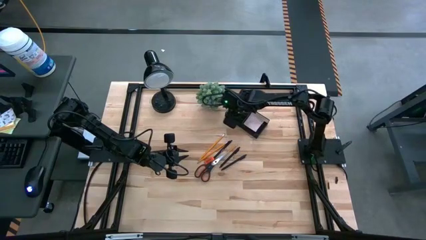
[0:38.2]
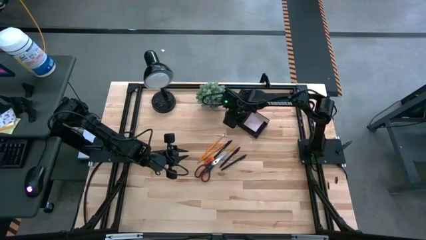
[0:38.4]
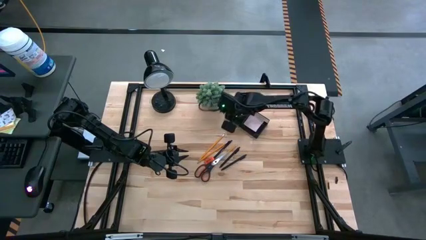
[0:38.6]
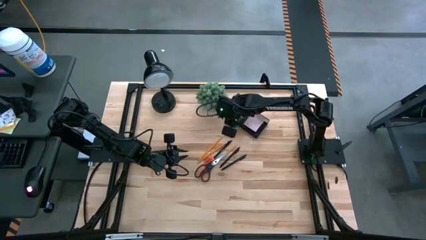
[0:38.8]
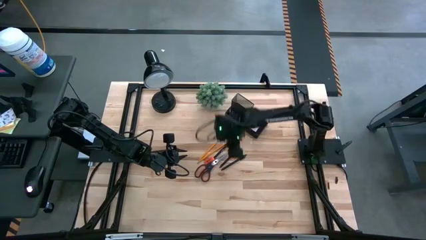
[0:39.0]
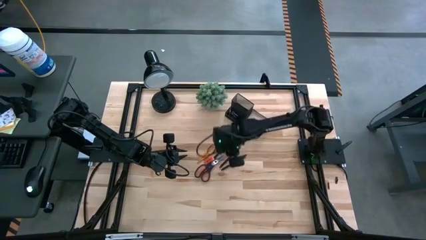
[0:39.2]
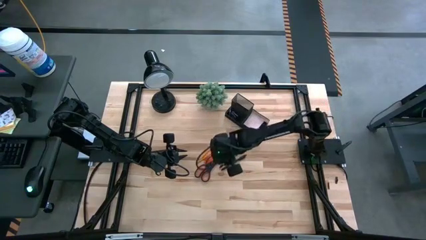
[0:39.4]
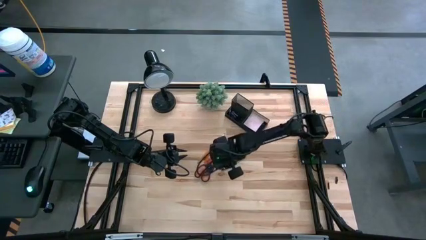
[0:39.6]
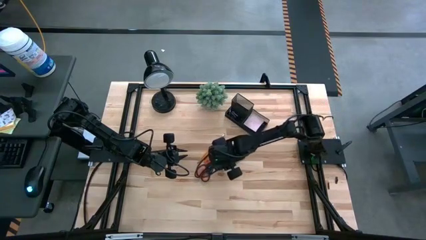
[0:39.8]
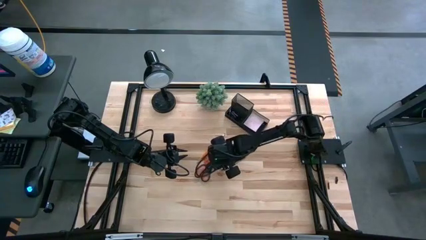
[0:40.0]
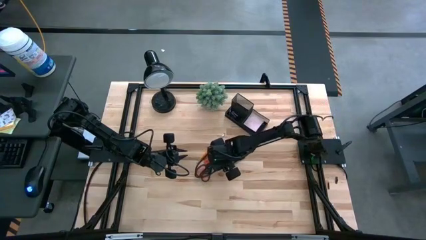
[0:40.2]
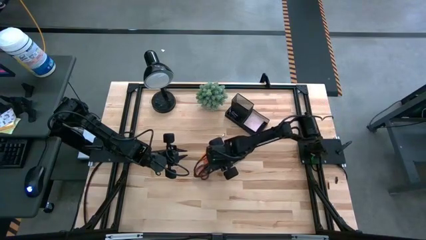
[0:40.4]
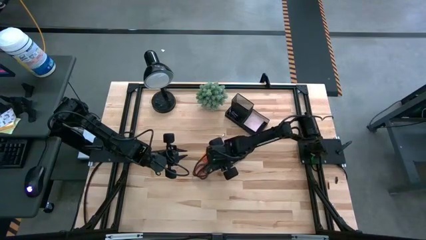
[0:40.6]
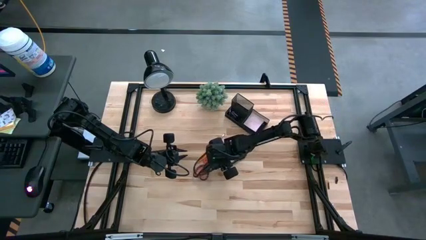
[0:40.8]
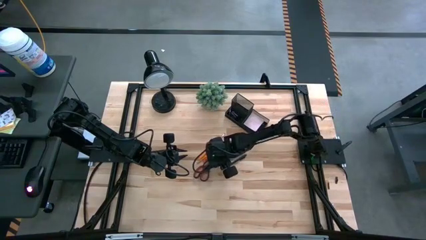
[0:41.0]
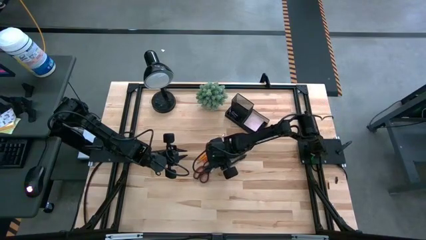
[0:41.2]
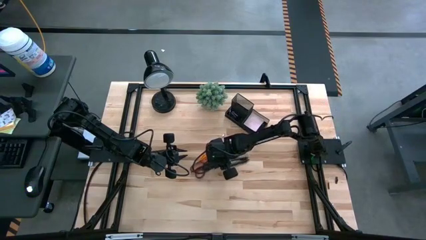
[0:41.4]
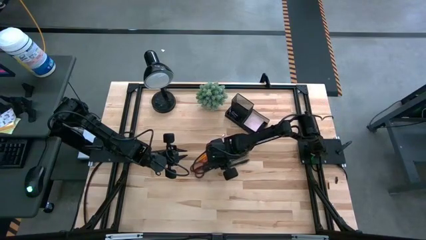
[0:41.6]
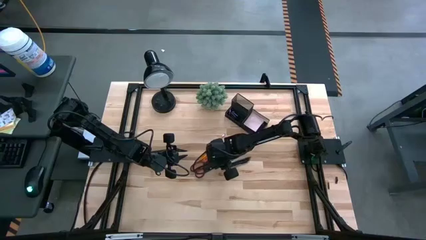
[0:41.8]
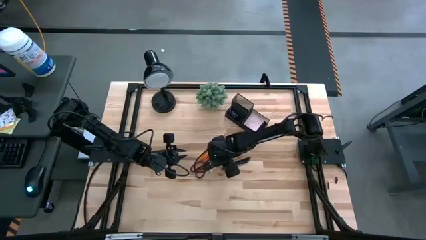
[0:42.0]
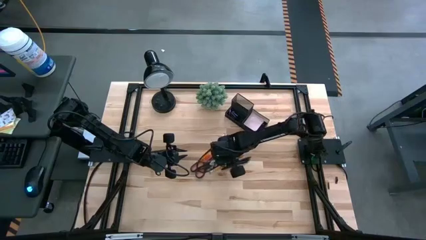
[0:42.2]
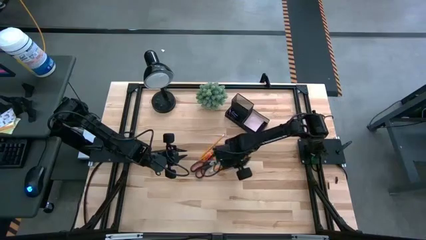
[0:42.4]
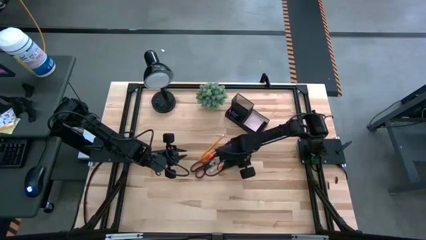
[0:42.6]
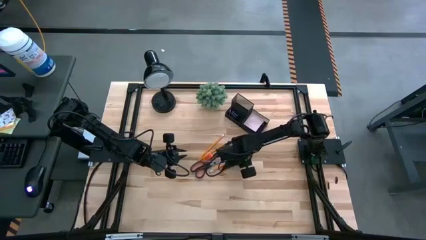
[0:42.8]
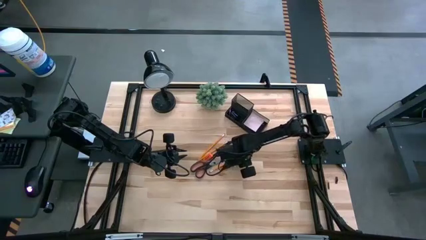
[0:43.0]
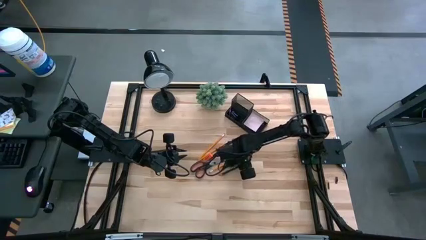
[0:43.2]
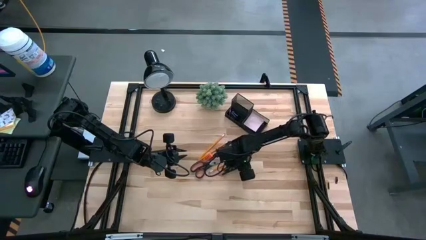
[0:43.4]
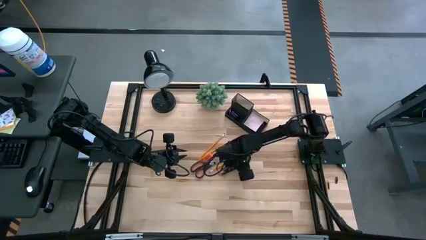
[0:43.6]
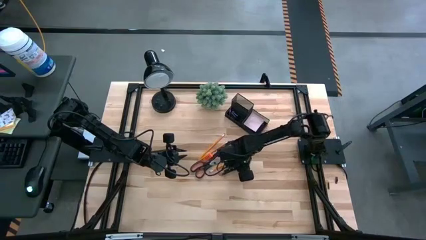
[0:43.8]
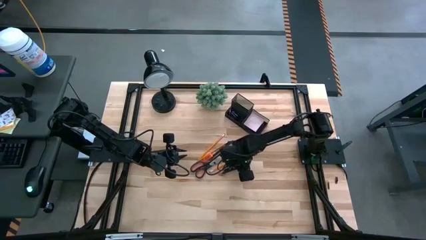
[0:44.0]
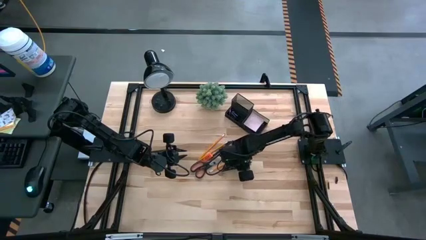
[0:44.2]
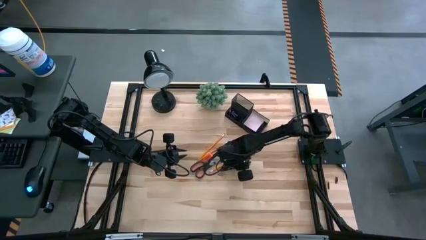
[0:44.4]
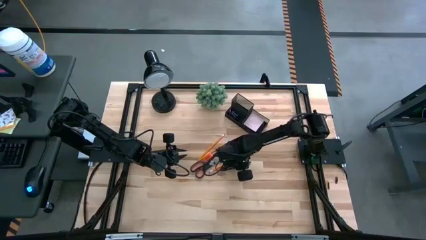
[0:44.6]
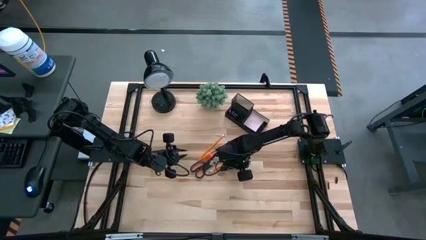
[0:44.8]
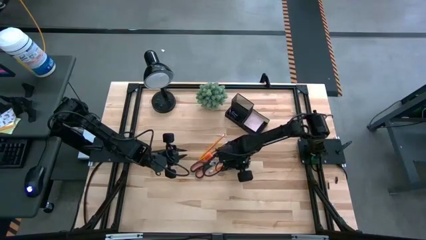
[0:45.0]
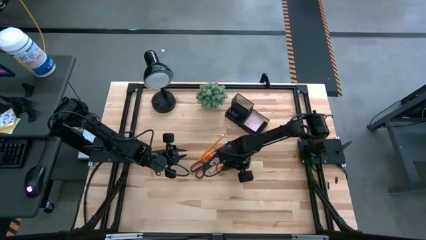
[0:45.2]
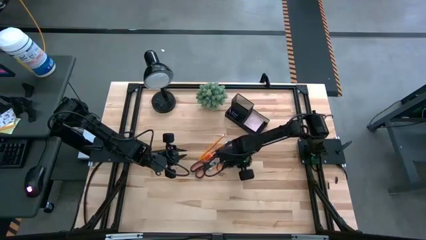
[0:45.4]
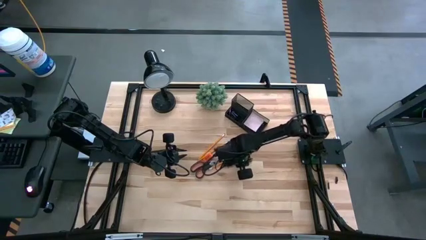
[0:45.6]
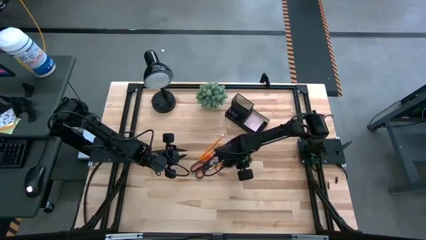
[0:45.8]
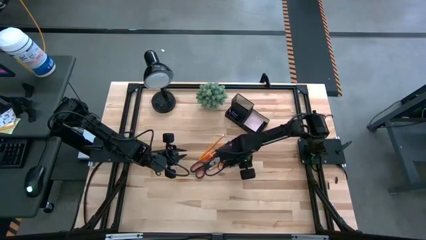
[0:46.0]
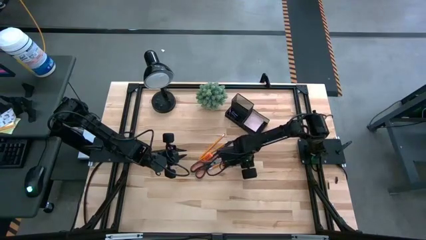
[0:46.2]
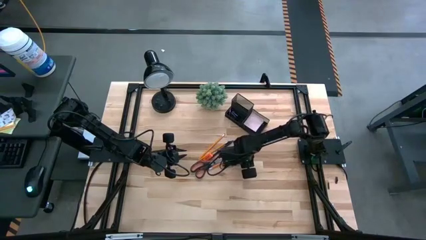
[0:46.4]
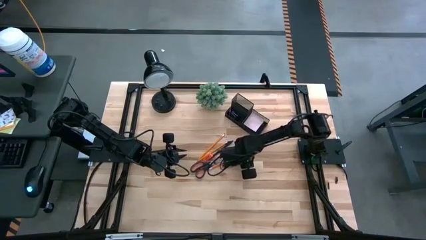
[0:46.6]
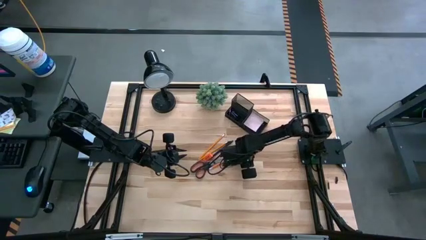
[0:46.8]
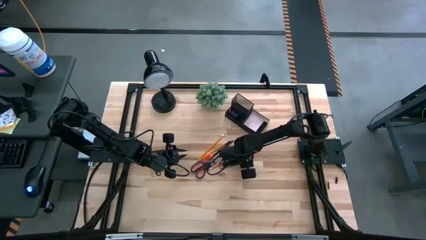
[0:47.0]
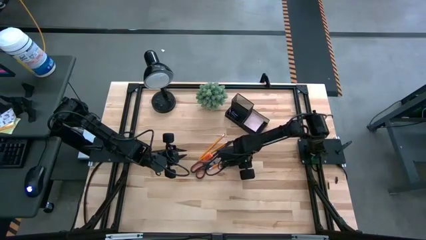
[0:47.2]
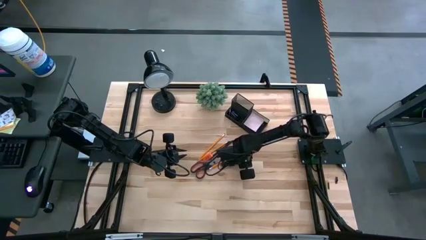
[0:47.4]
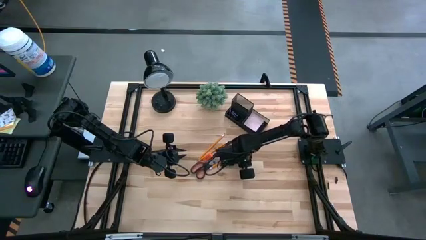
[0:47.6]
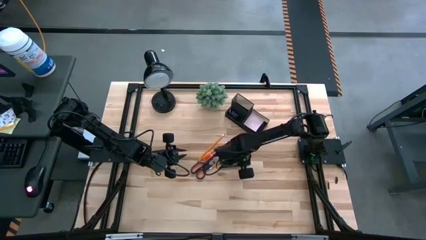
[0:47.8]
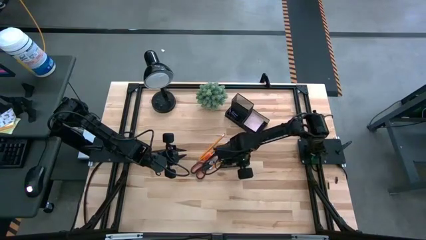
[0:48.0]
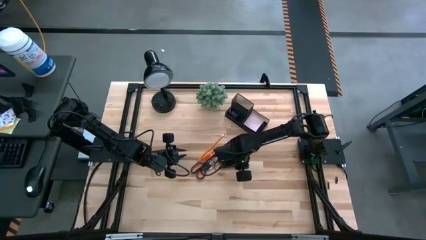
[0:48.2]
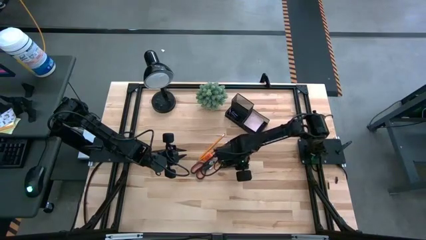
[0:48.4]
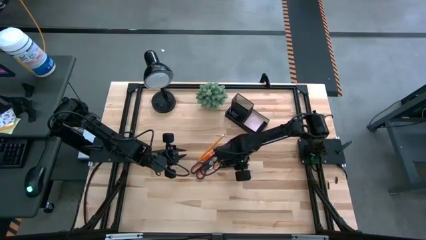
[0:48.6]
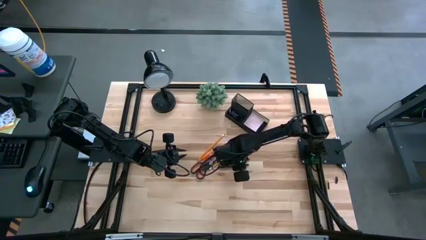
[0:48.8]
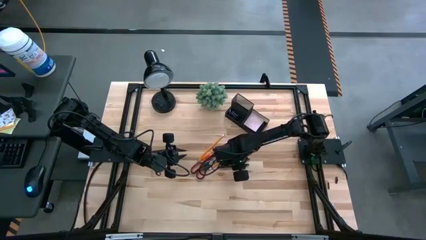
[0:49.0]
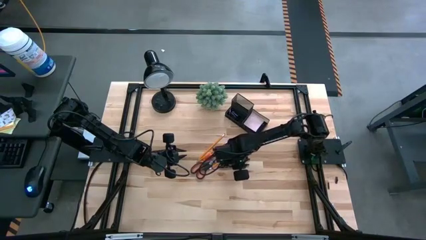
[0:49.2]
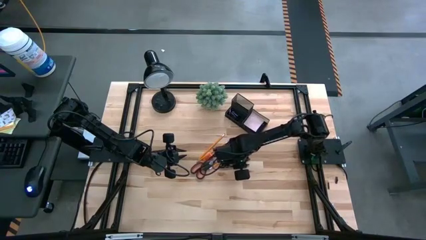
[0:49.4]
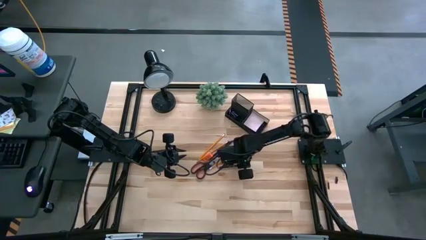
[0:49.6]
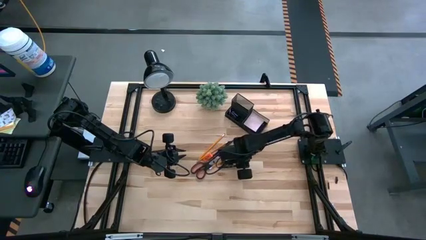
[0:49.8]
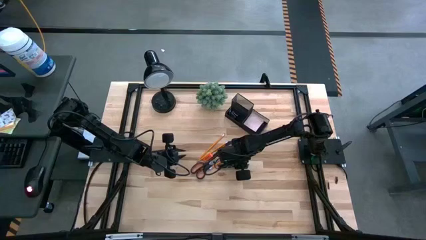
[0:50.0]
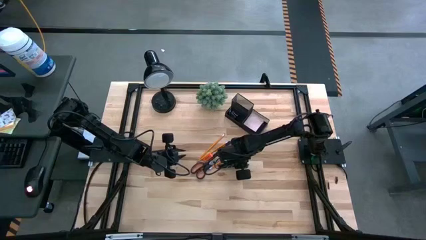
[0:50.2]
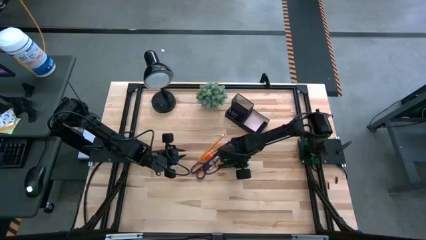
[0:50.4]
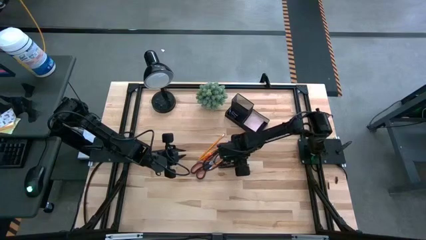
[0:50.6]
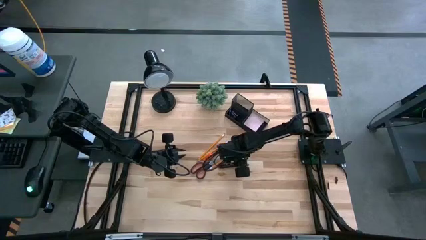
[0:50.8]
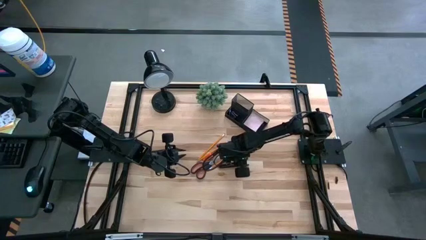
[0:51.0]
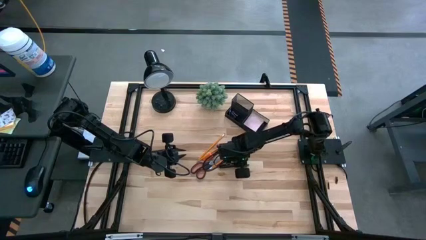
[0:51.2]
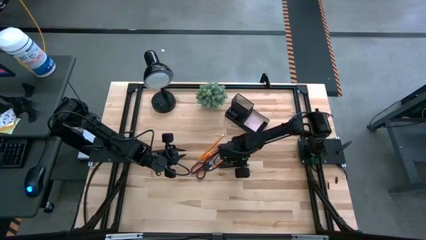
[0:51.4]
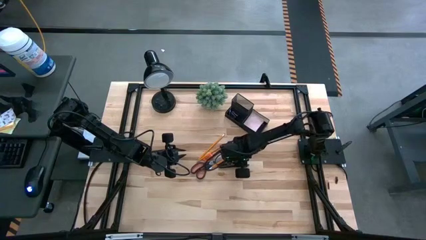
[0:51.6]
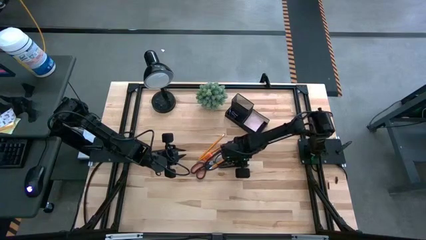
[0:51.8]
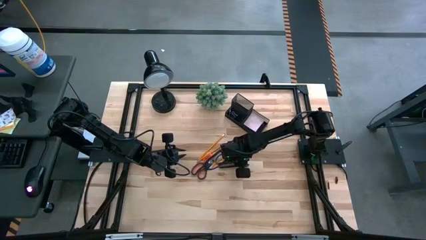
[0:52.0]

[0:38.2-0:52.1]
Task: Pick and place office supplies into organizer
Put the center black ballpen into the black desk organizer

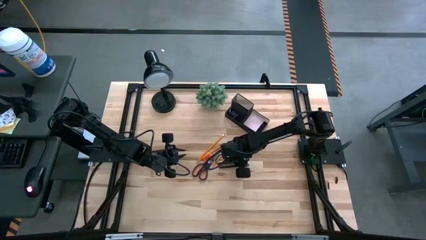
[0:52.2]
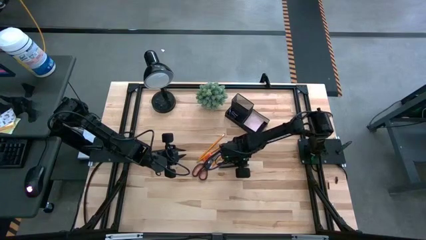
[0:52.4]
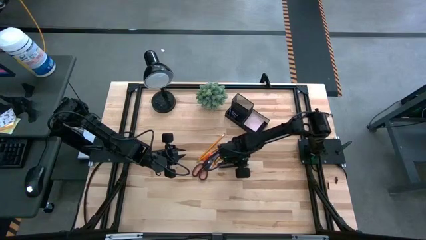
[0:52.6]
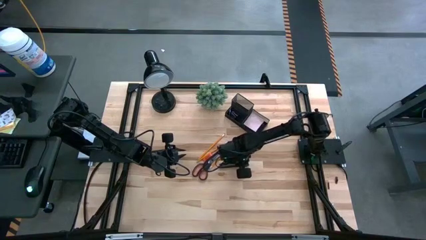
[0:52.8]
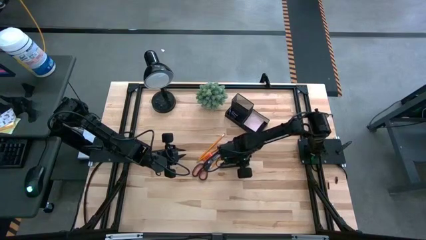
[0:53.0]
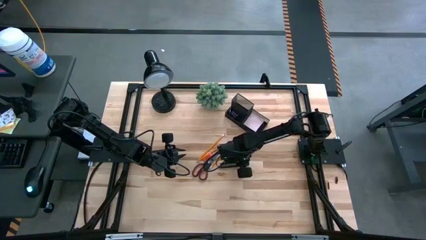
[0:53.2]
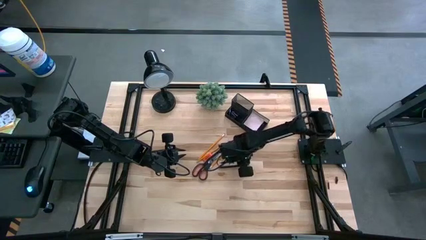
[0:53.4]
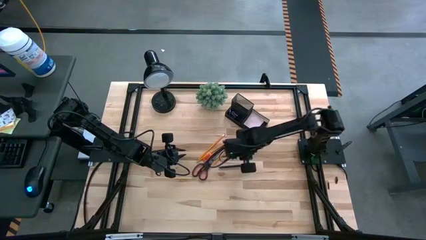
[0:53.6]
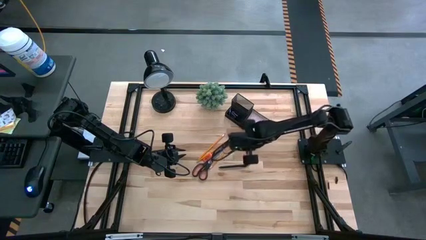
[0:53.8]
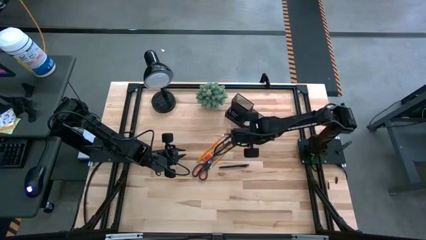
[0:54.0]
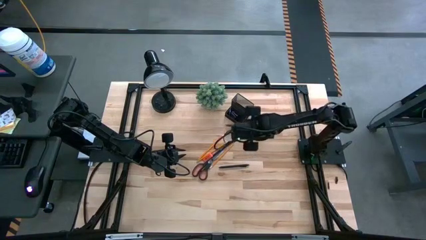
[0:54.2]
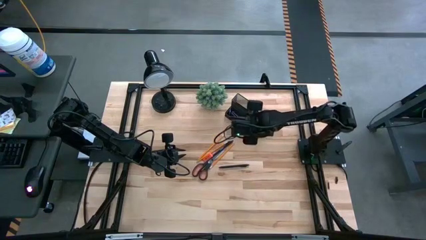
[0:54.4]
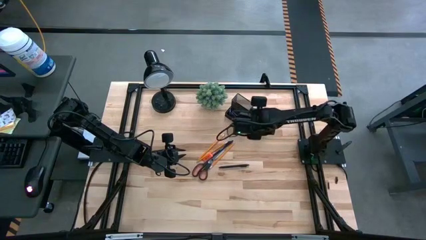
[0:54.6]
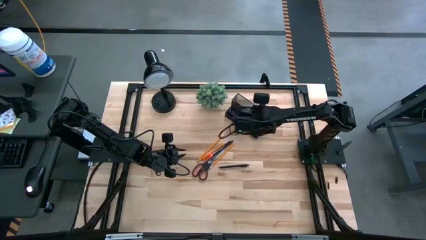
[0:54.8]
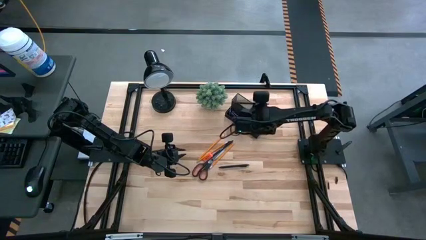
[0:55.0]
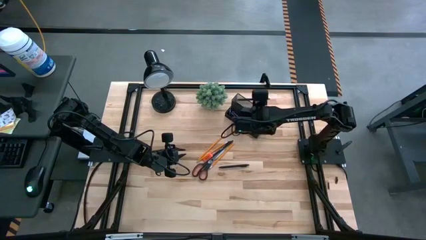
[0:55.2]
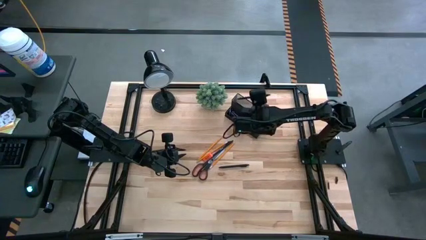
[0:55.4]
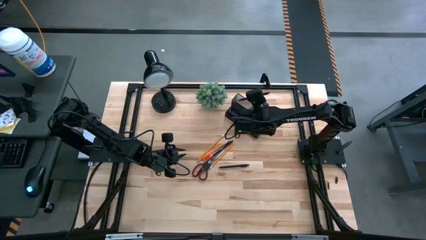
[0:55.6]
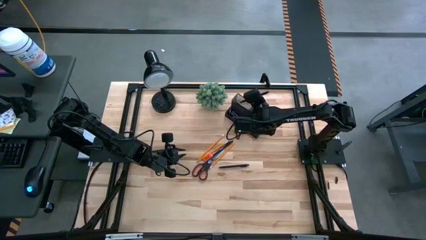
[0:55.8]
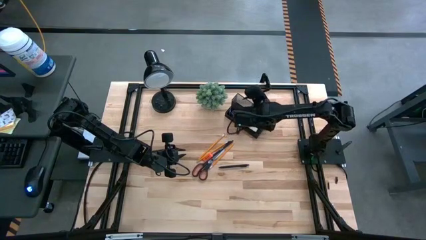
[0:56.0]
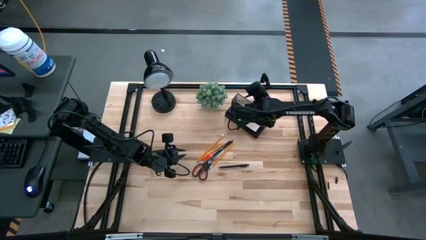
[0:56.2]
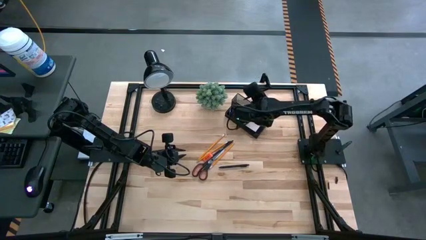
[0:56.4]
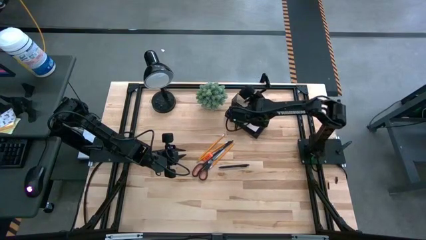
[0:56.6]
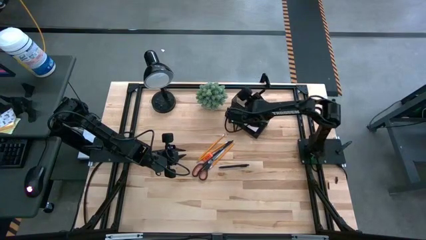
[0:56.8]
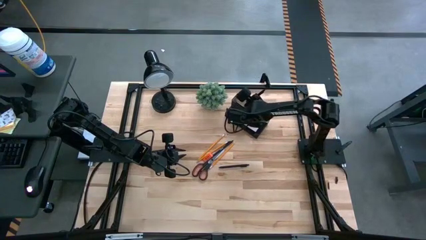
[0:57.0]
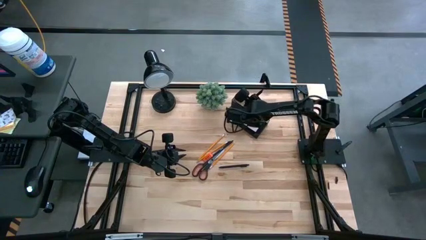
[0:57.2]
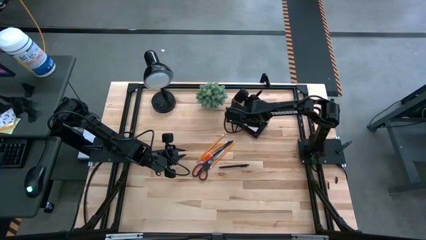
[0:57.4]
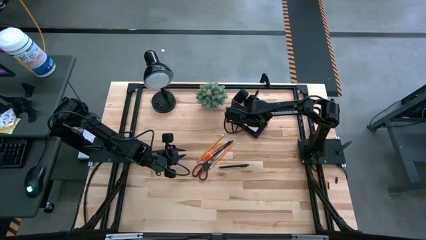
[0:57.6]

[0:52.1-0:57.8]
Put the center black ballpen into the black desk organizer
